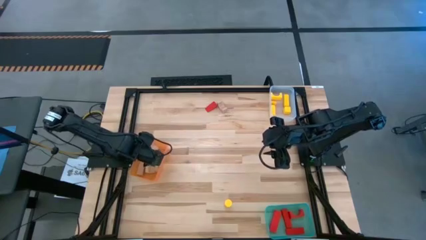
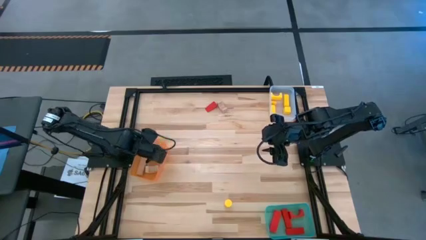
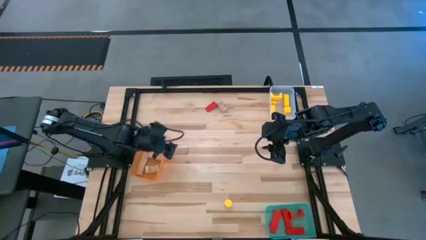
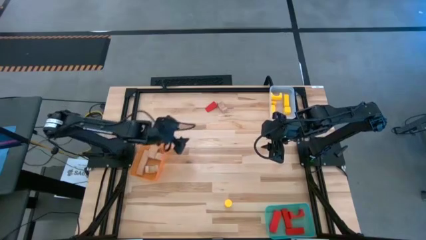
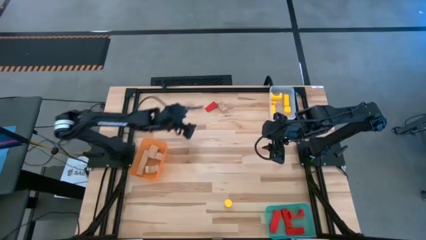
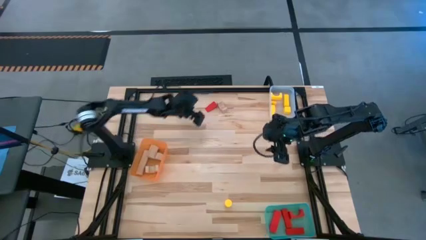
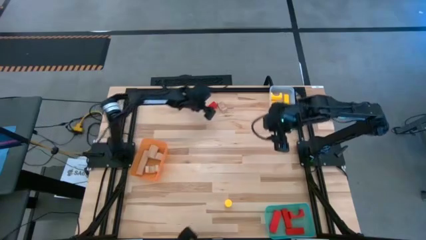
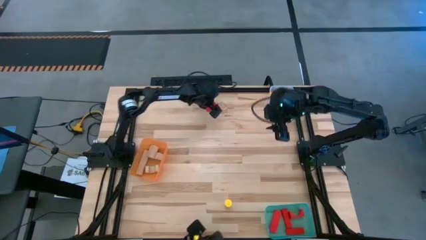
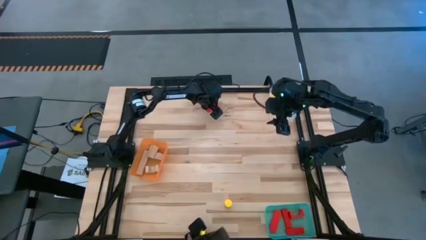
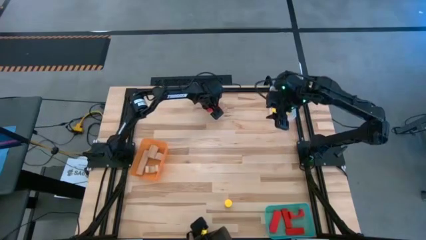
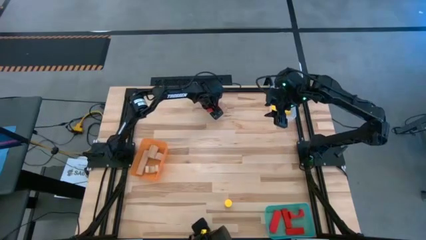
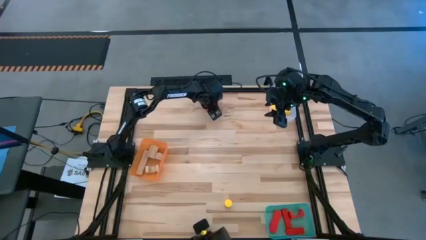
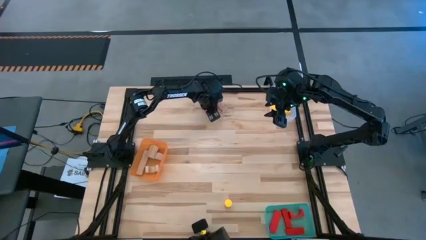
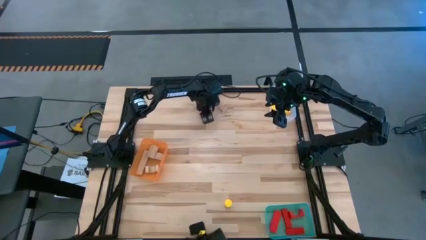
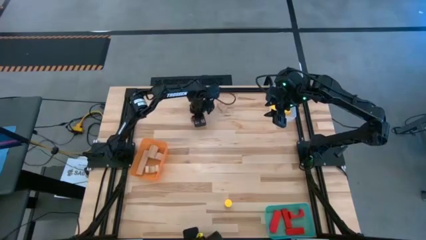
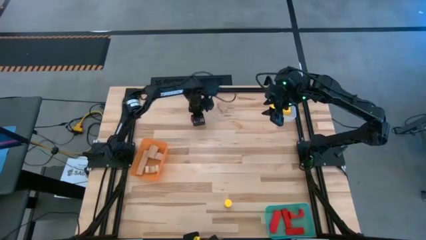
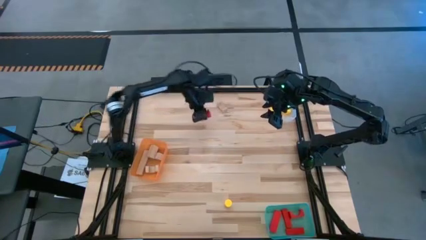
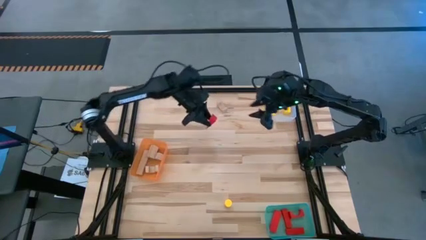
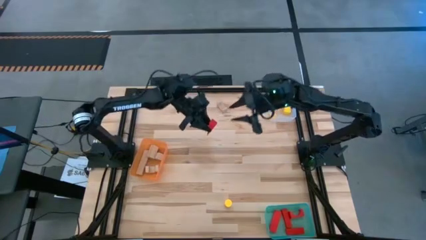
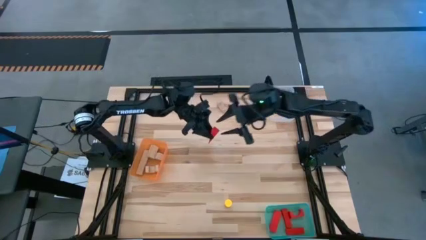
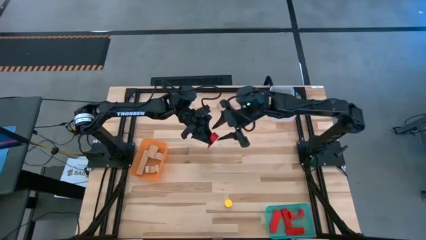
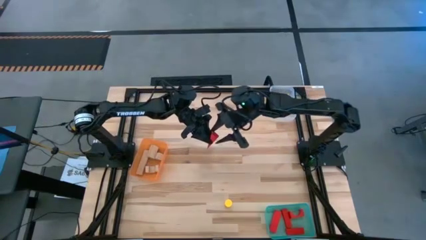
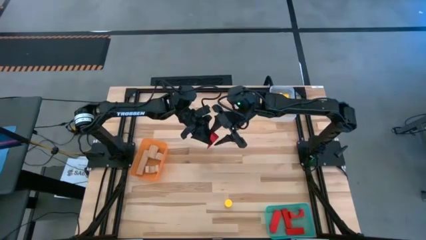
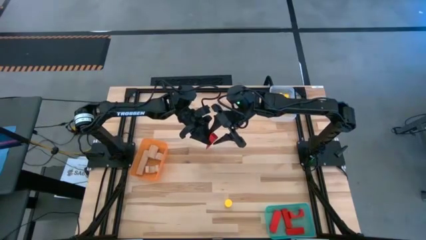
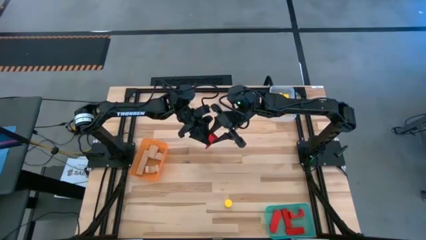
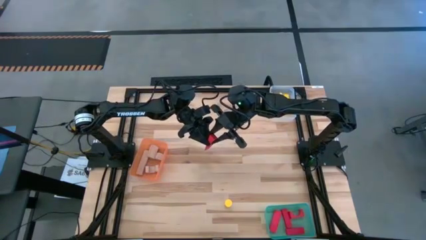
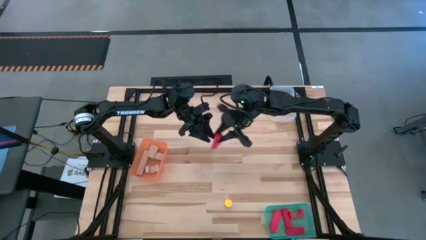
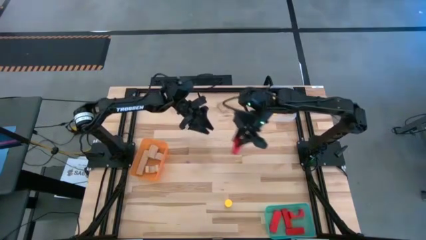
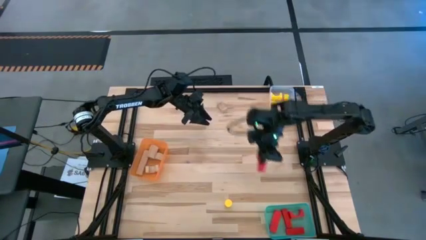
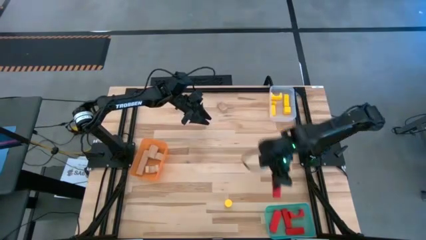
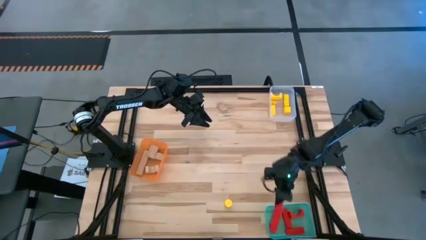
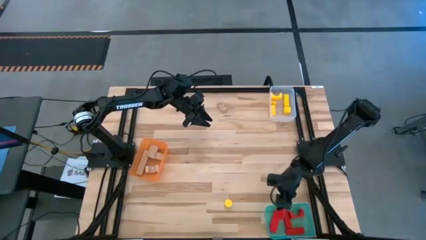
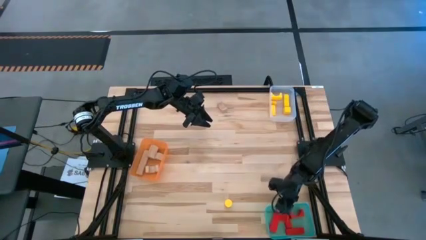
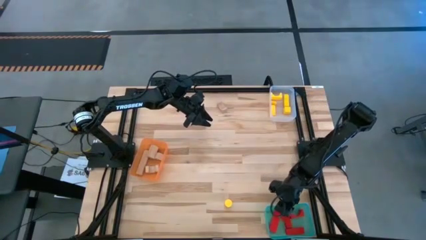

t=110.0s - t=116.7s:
Task: Sort & place blocks by color
Put the red block into the green bin

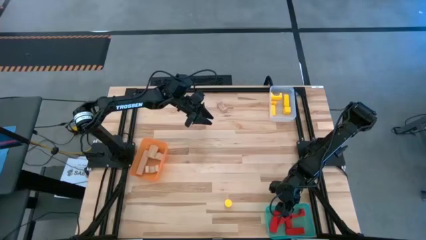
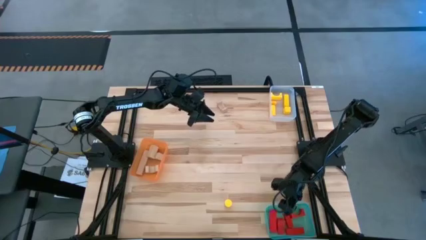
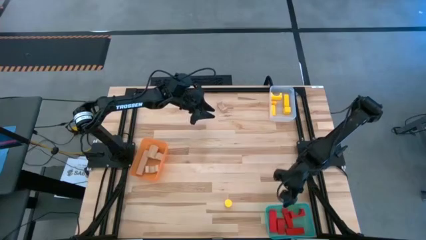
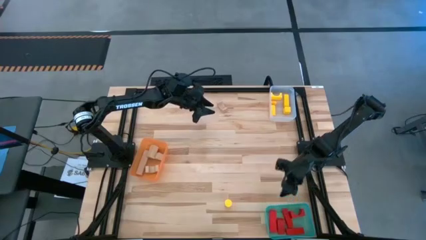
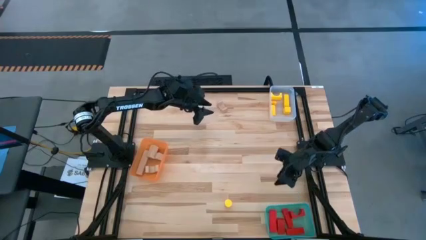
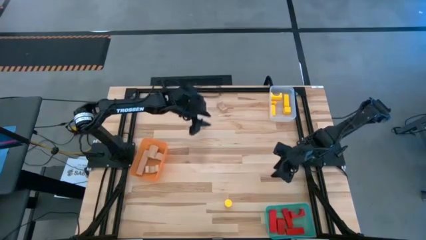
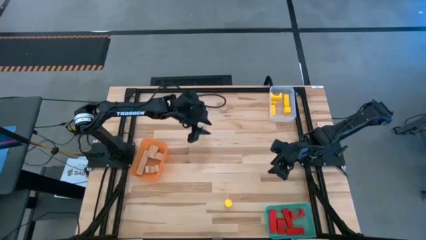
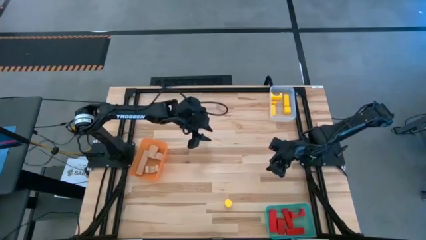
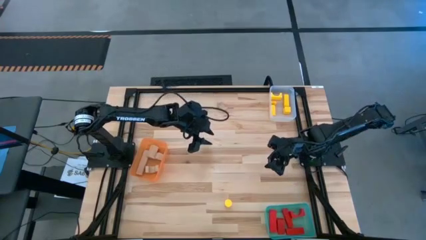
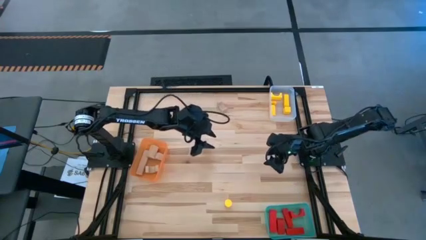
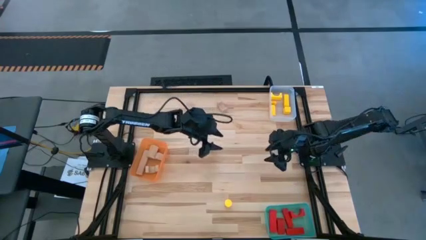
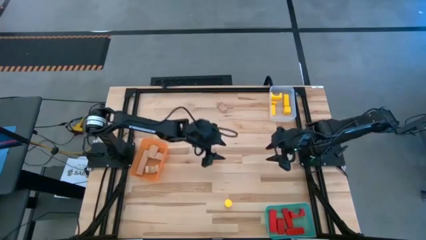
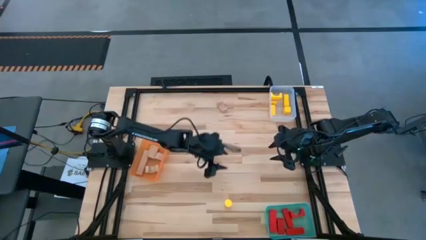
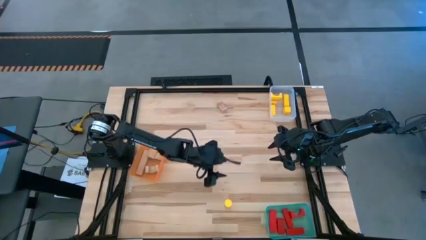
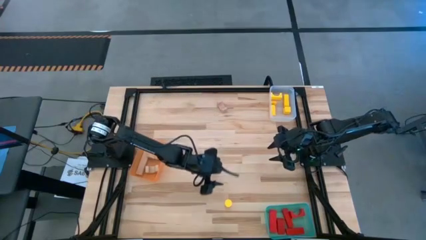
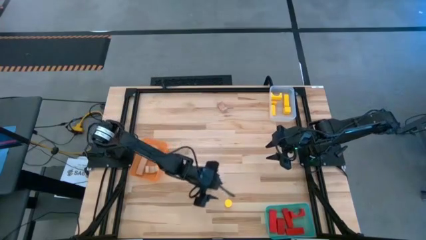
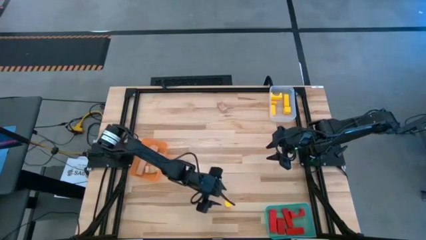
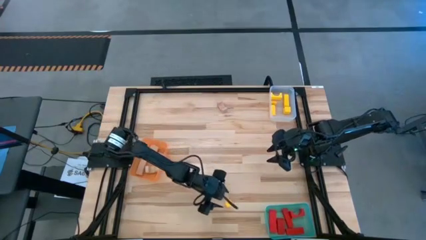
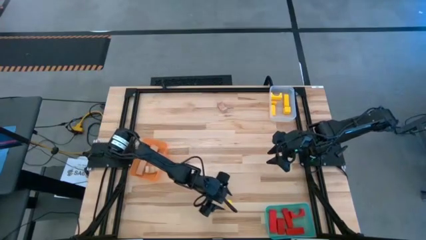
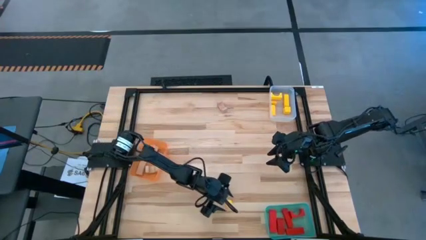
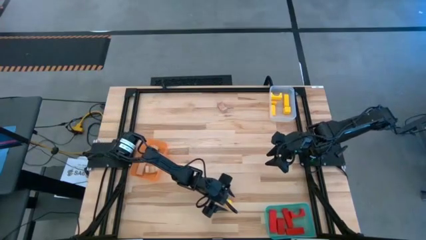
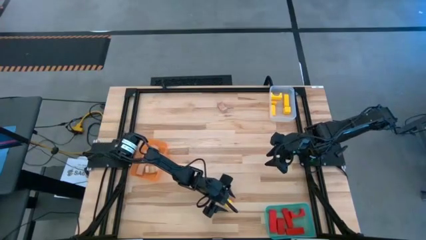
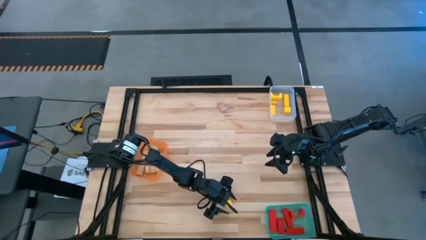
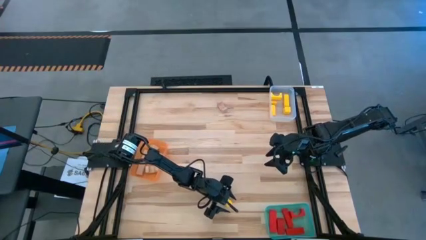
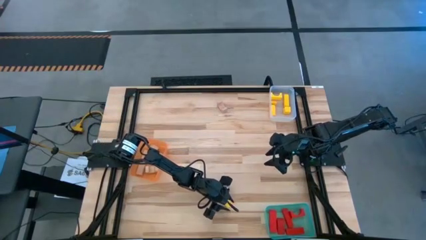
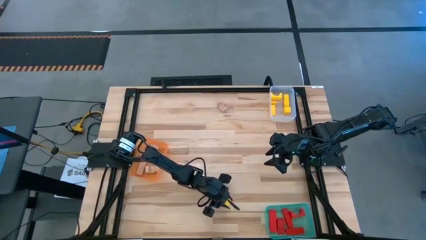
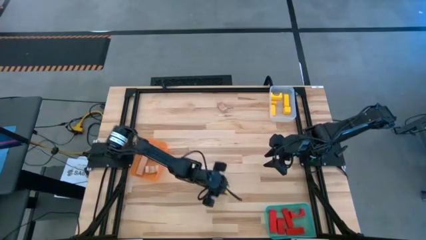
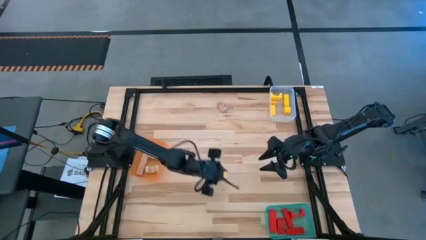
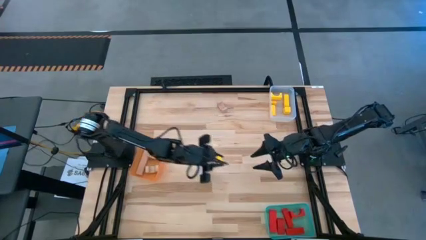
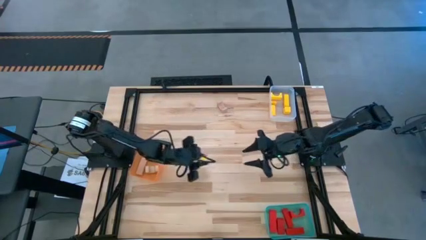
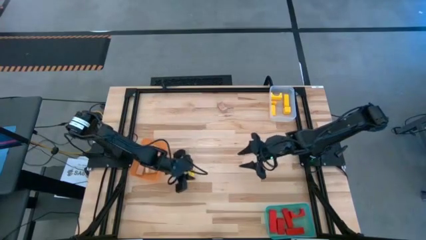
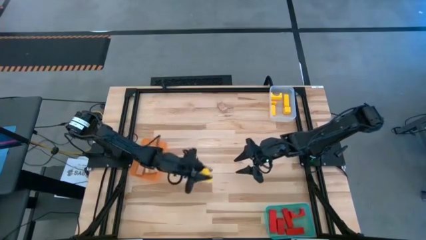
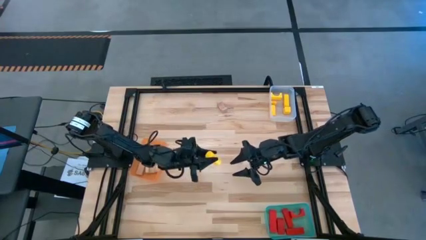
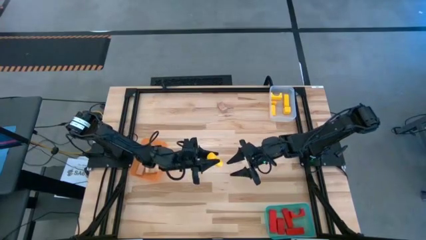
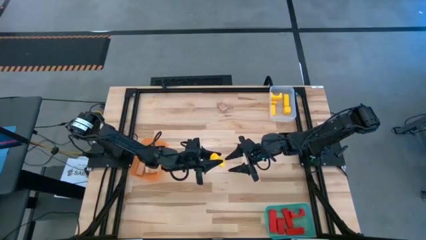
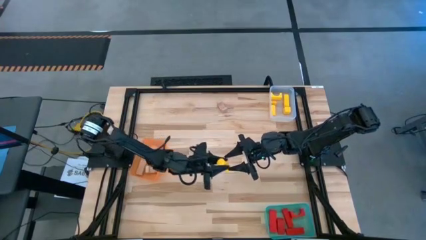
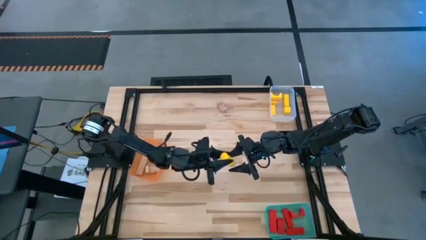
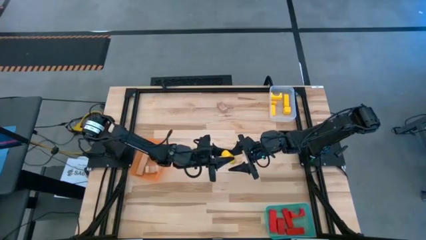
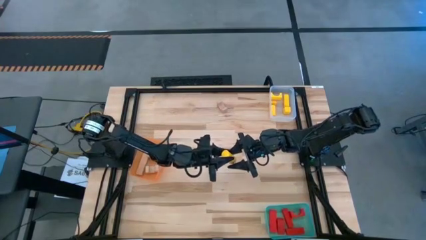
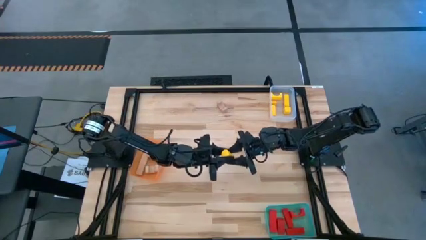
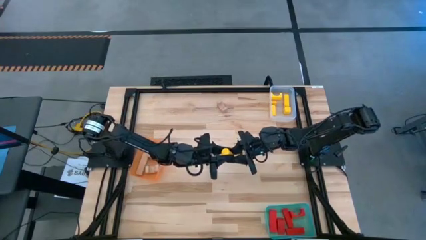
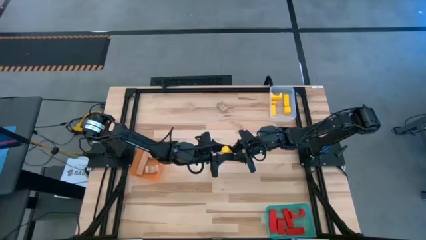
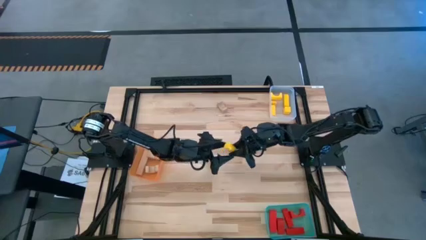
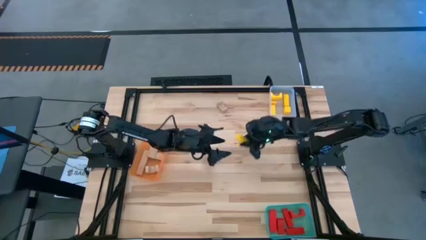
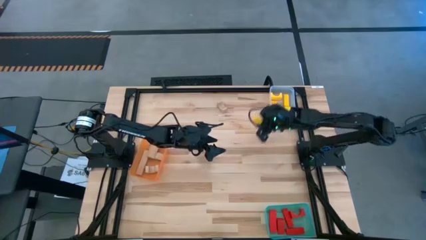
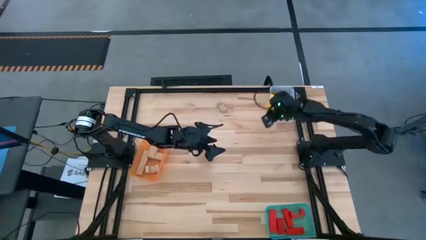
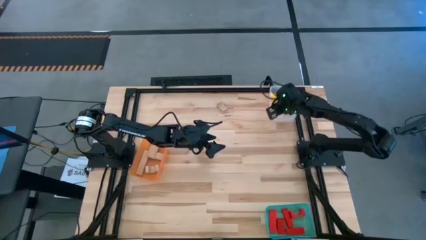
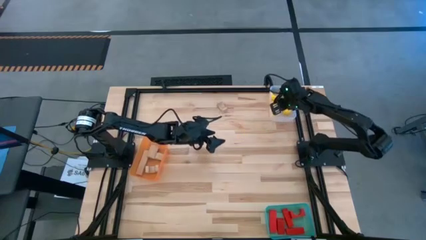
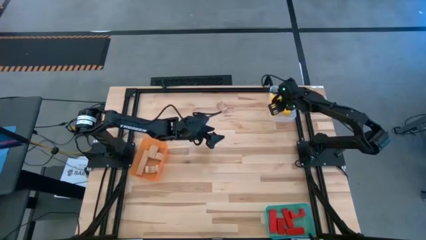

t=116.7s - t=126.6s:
Put the yellow block into the transparent bin
